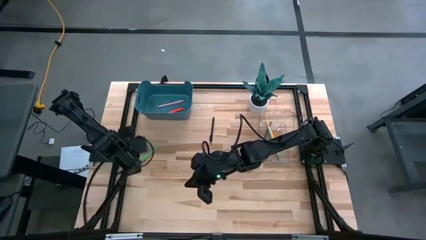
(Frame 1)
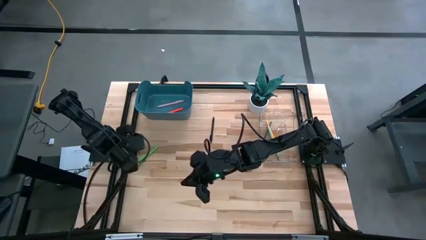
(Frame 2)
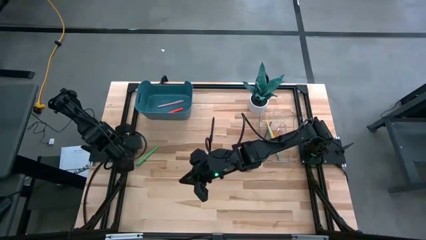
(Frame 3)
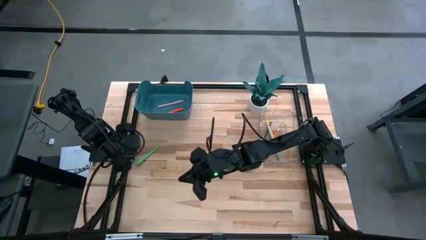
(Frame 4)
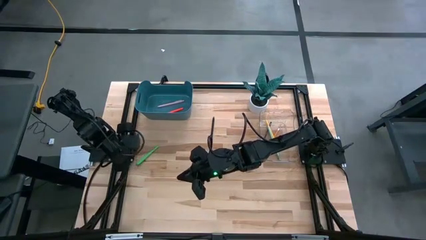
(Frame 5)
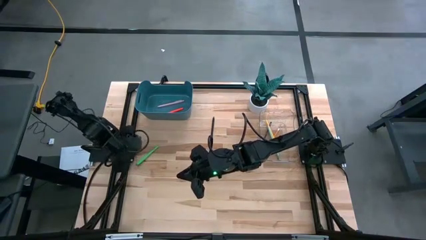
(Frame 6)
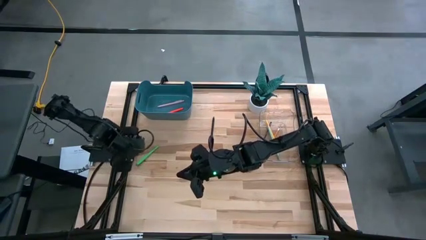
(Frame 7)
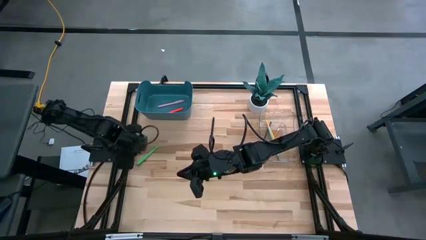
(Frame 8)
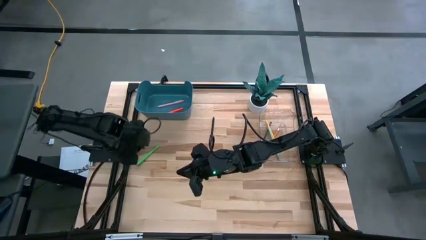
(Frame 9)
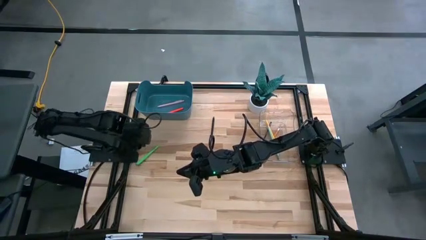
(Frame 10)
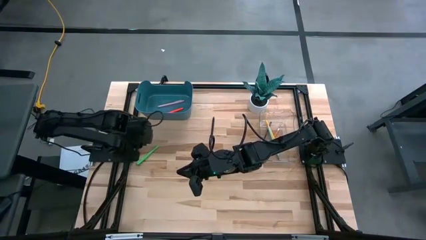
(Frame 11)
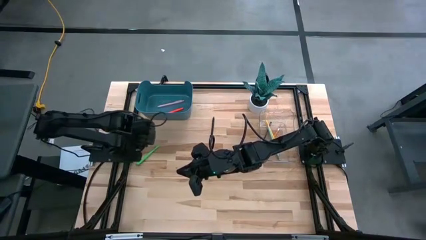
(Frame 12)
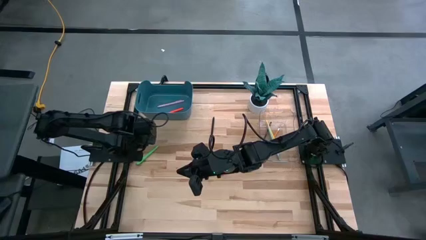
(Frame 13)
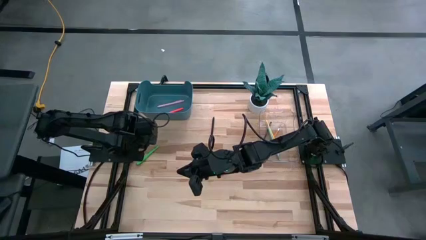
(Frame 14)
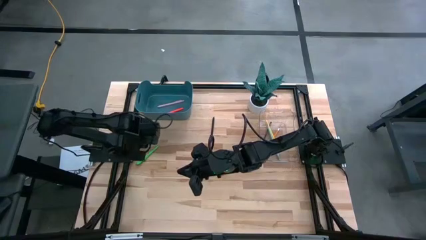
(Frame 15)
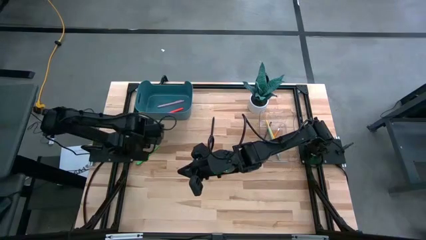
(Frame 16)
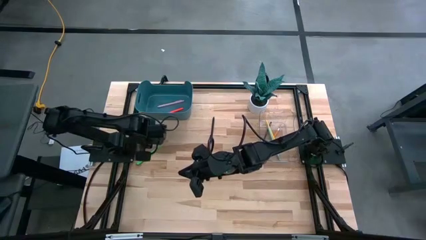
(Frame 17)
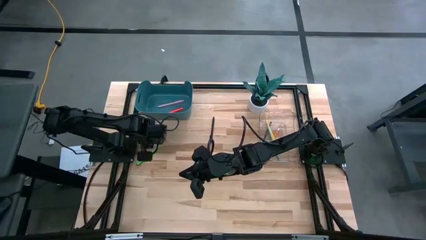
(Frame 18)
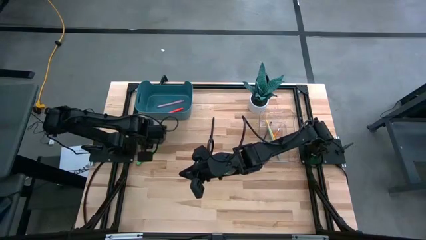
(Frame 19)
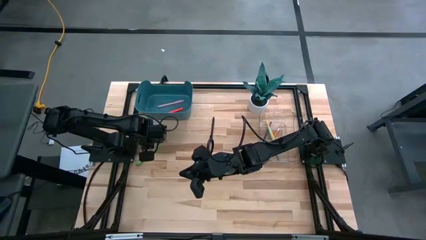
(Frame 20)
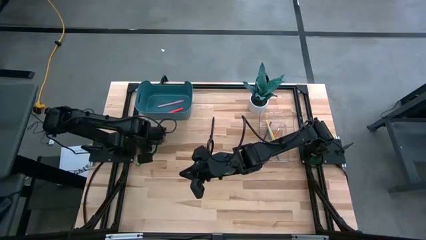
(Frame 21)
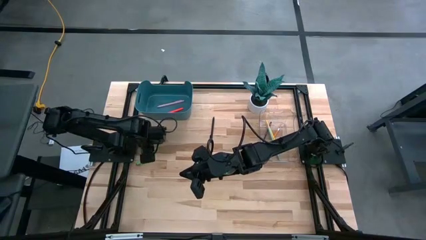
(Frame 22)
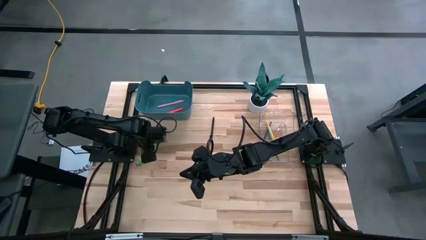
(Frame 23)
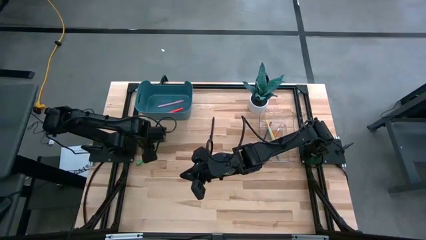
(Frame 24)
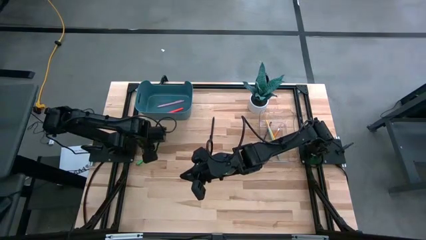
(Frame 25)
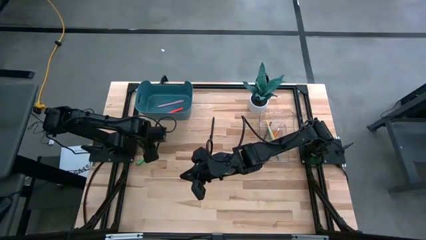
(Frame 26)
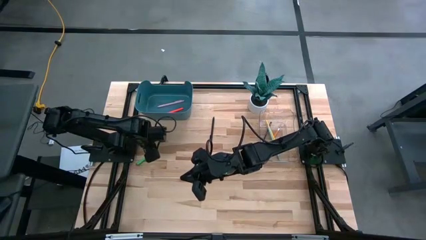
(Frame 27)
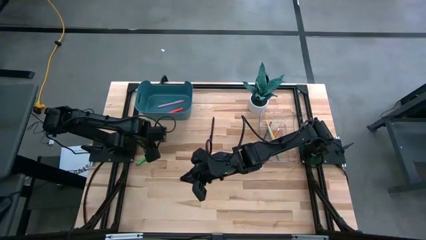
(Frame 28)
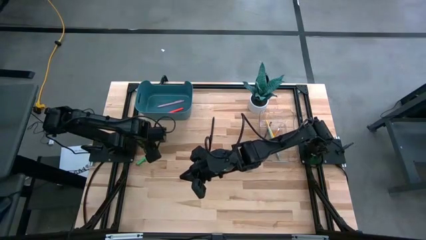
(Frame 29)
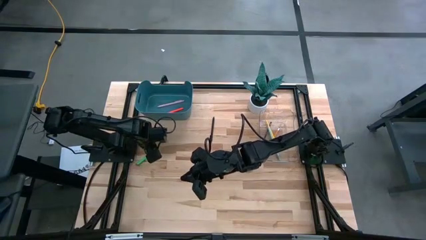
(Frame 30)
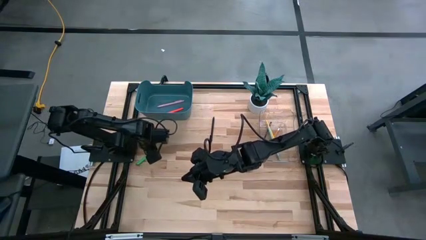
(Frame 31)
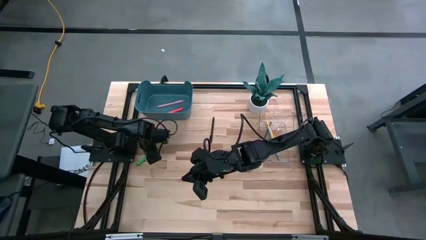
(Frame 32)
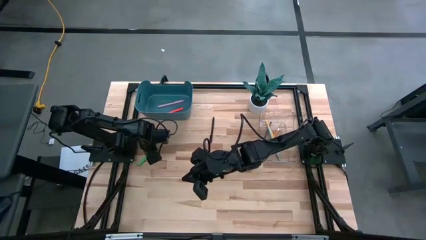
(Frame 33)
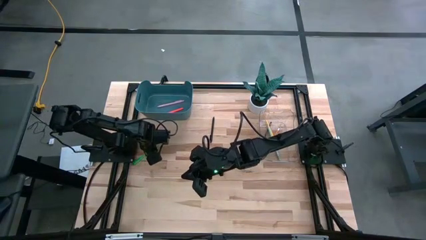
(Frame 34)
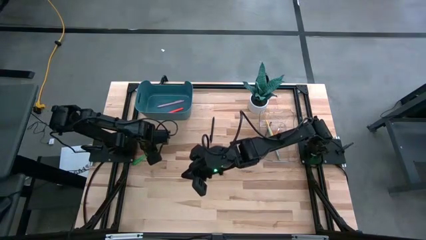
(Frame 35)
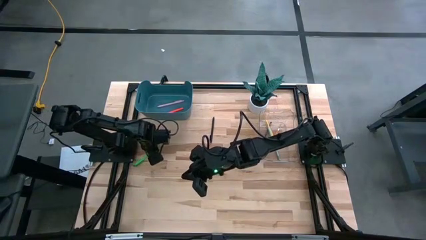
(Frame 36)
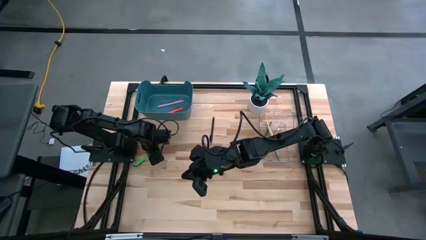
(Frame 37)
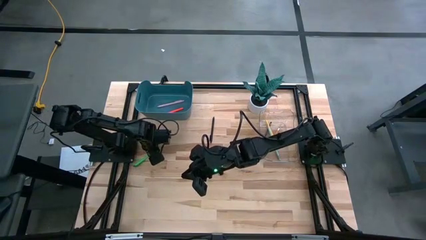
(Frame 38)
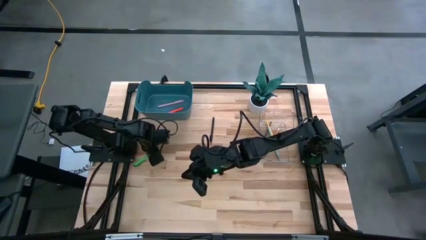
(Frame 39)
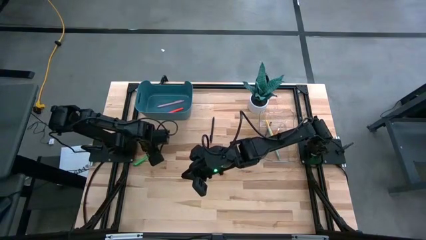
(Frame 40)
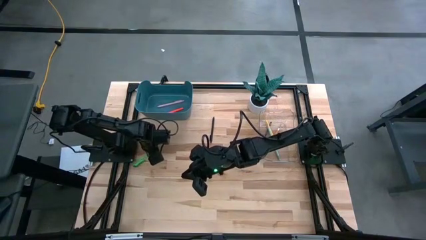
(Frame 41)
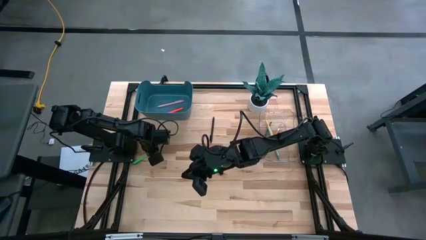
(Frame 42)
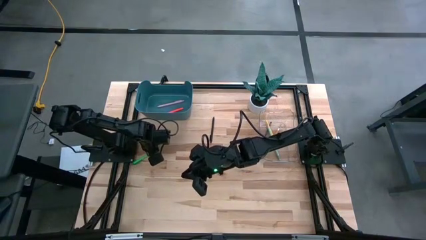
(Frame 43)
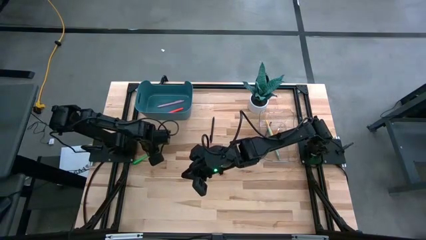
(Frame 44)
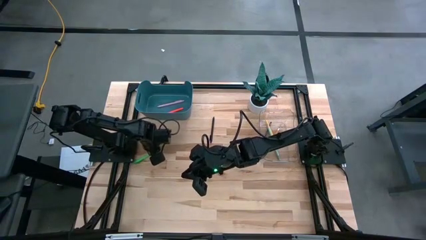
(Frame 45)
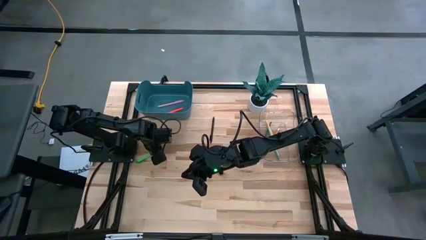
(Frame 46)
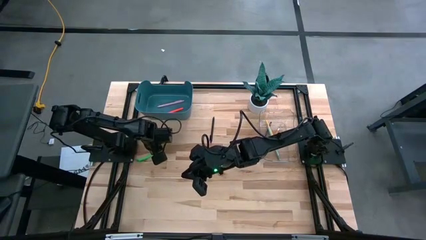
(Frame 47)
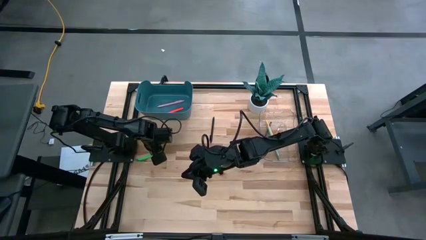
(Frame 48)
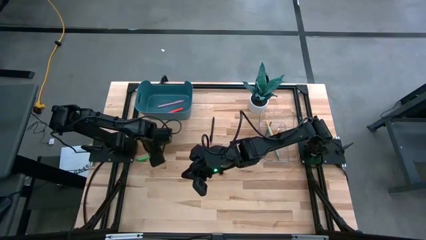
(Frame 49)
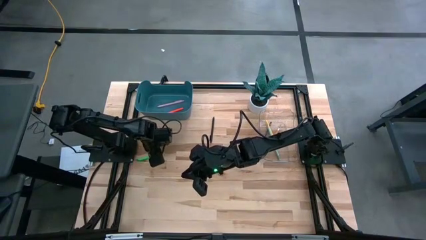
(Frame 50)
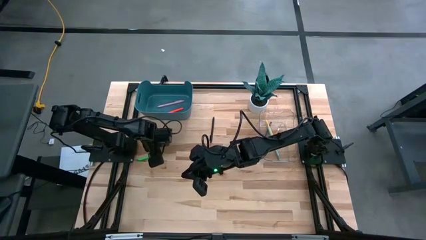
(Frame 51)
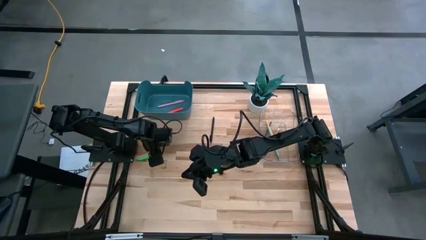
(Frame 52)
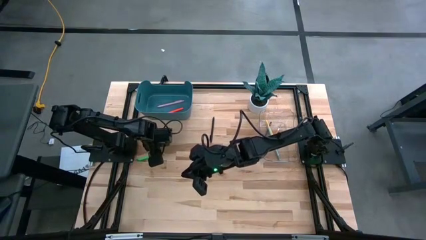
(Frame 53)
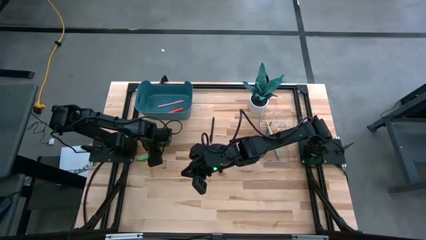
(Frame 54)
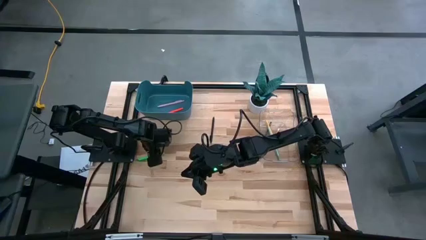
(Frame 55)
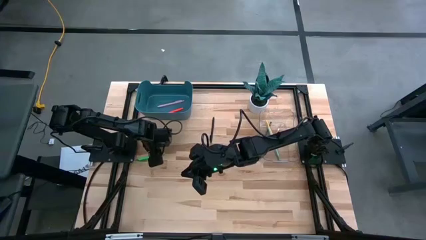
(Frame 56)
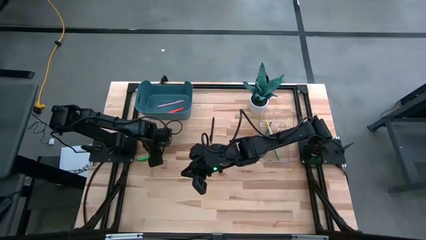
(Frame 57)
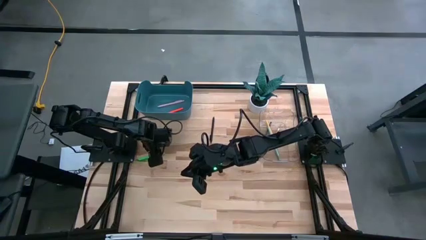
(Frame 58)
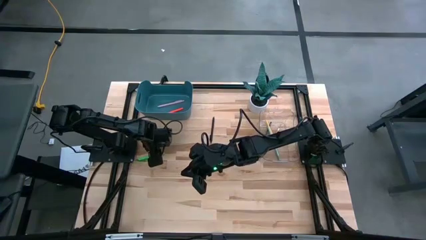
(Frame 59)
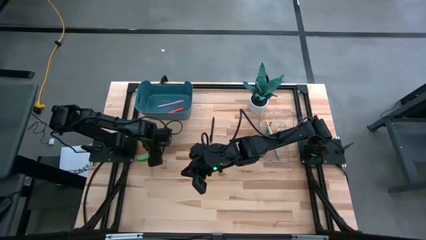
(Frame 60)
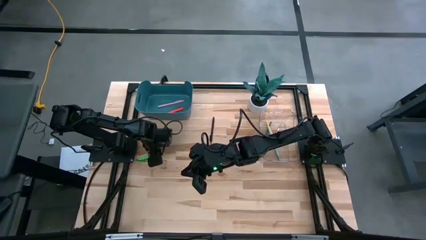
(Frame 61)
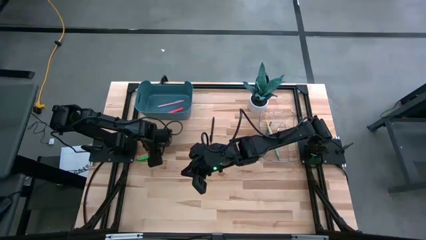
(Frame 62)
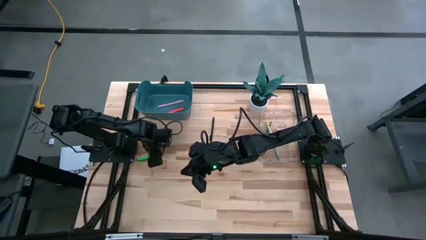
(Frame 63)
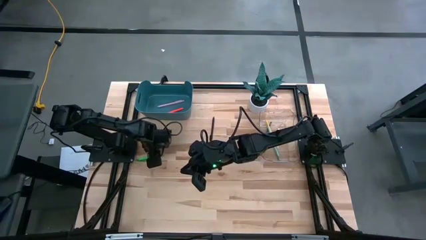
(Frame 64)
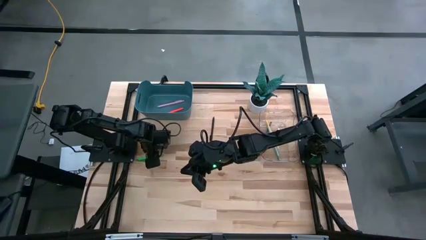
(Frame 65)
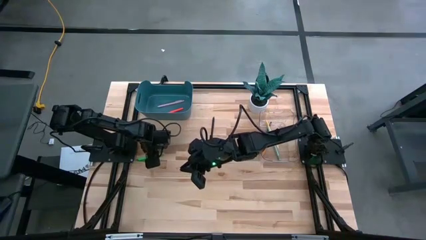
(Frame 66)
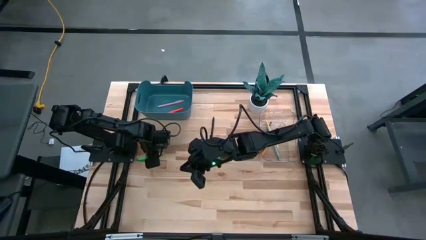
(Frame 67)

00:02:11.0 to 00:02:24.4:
Task: Sort pens & pencils
Put the green pen into the blue bin

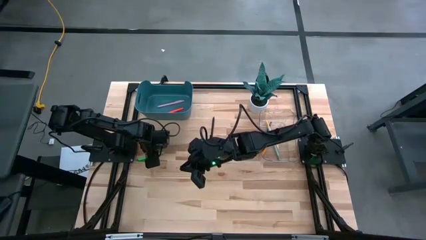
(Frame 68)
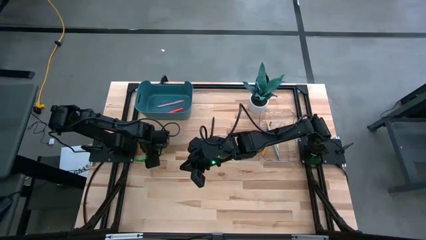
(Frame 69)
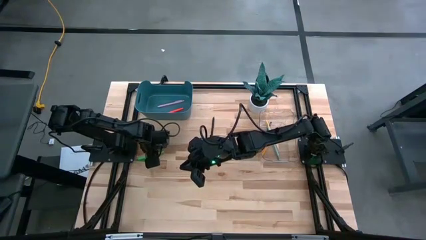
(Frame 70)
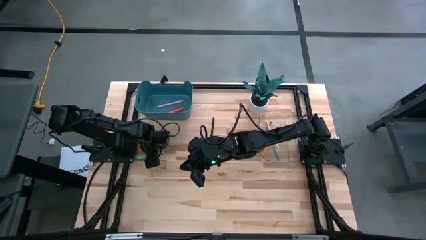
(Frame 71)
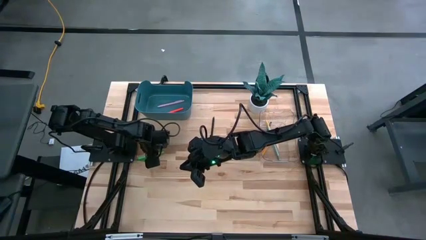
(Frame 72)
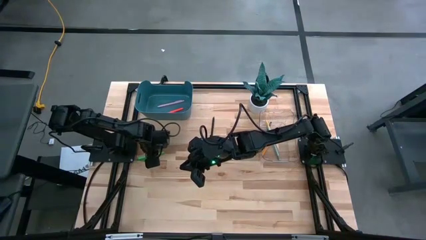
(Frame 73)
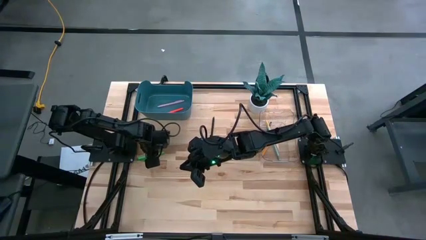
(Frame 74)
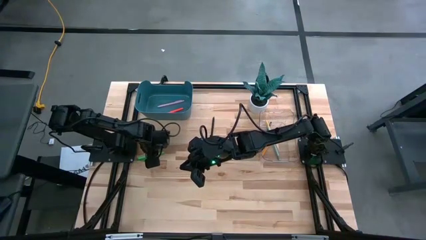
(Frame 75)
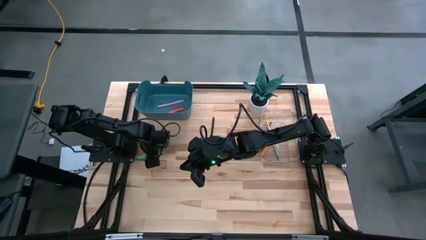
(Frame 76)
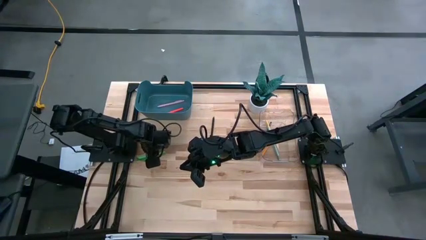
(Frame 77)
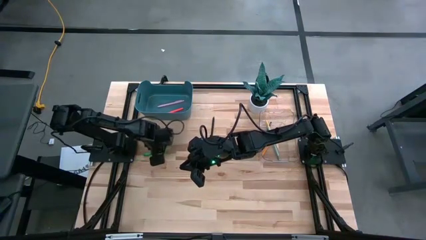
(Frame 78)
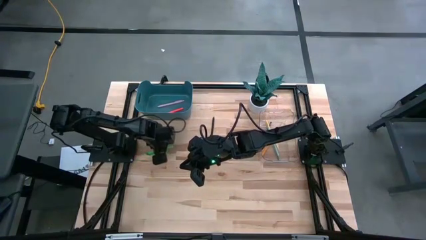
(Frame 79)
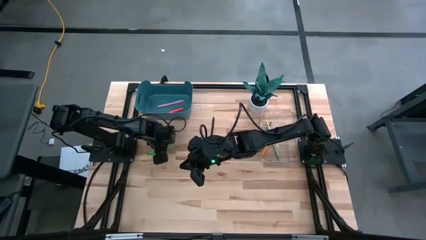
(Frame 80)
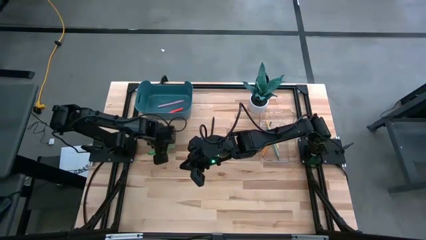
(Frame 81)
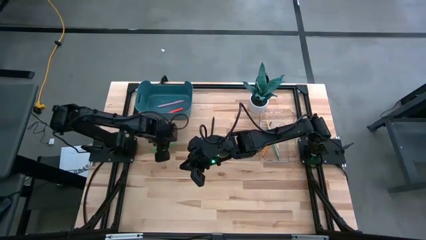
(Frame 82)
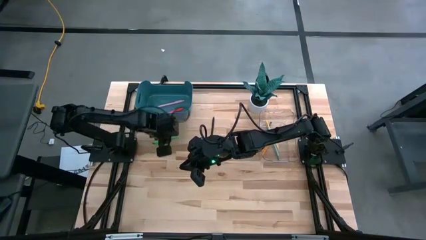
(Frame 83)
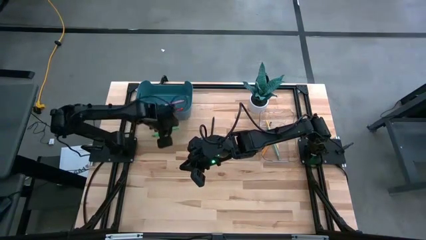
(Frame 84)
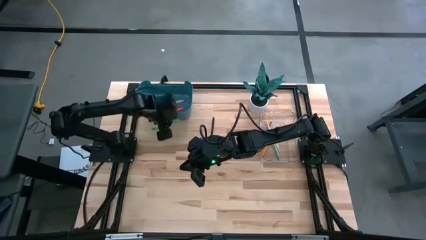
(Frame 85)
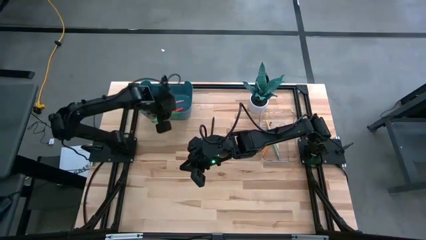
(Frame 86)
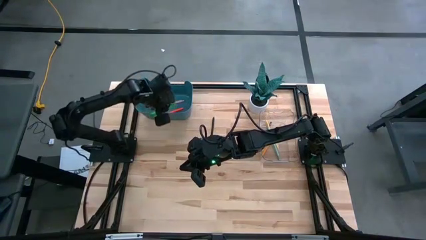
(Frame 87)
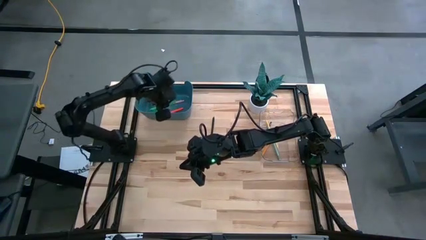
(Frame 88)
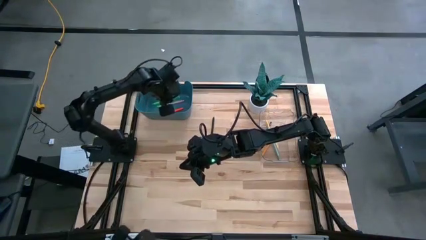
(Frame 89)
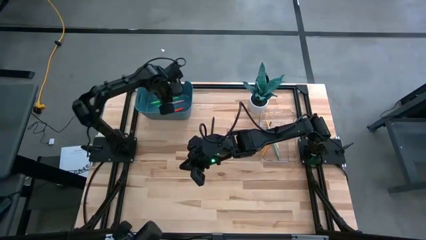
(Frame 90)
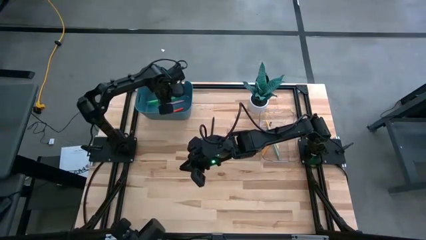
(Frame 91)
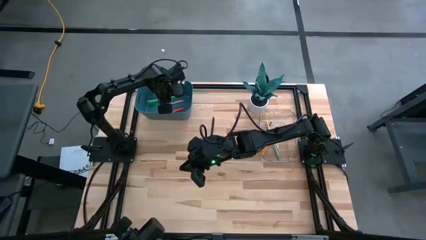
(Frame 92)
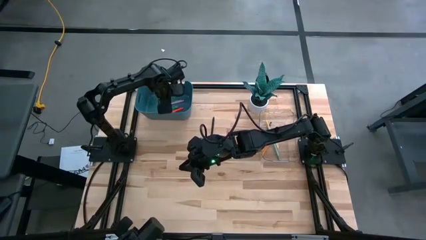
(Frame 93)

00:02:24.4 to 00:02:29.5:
Put the green pen into the blue bin
